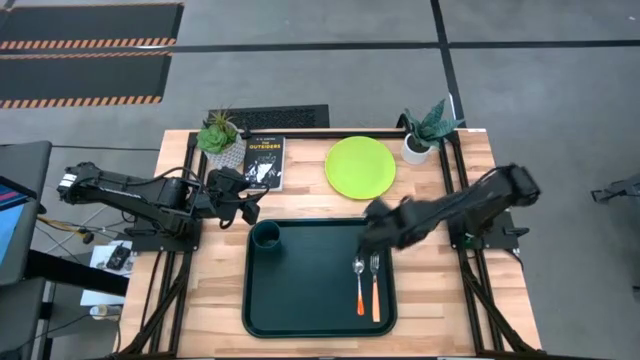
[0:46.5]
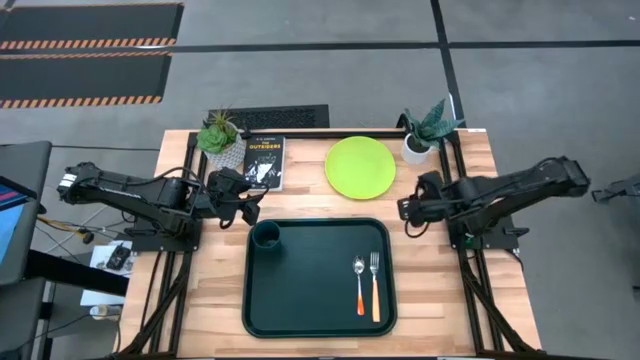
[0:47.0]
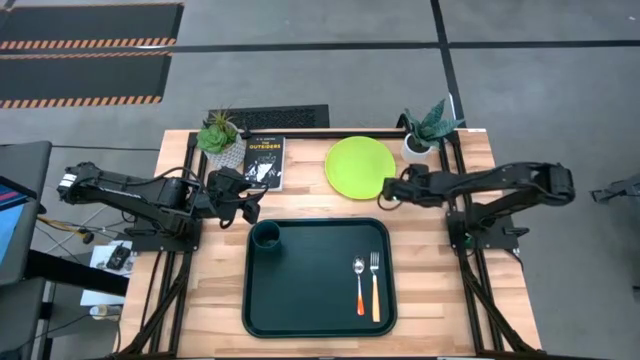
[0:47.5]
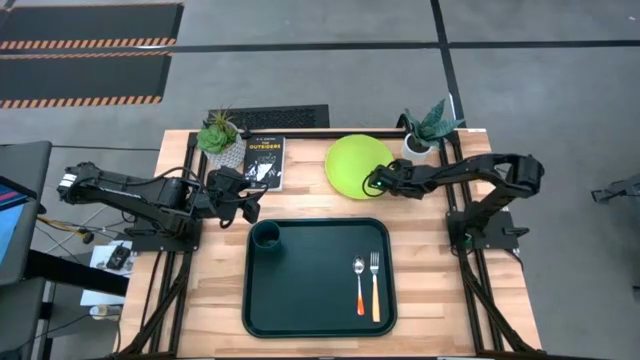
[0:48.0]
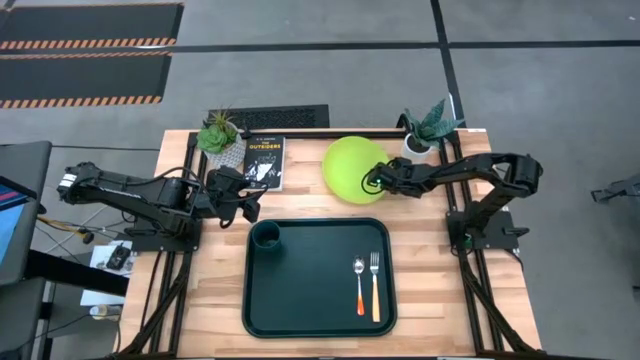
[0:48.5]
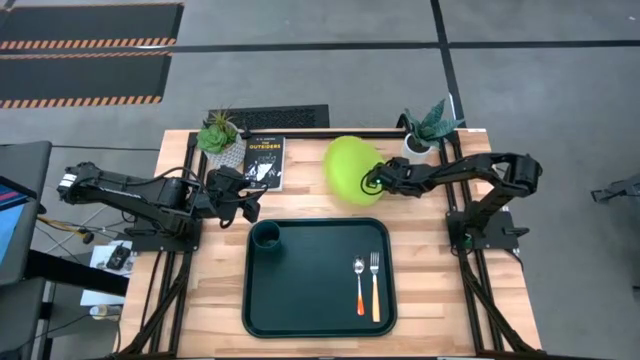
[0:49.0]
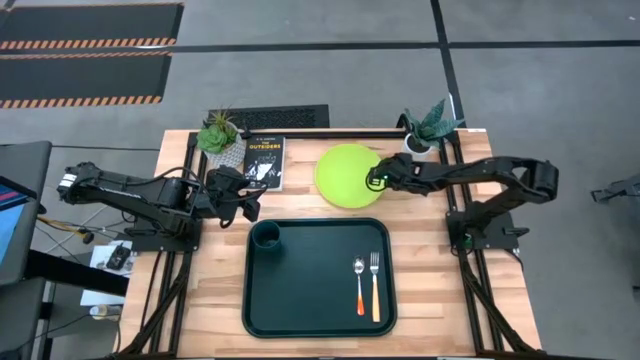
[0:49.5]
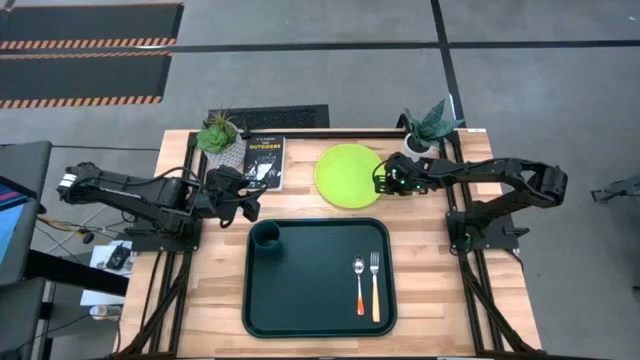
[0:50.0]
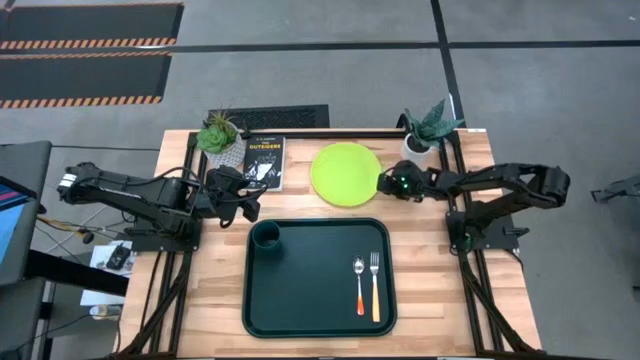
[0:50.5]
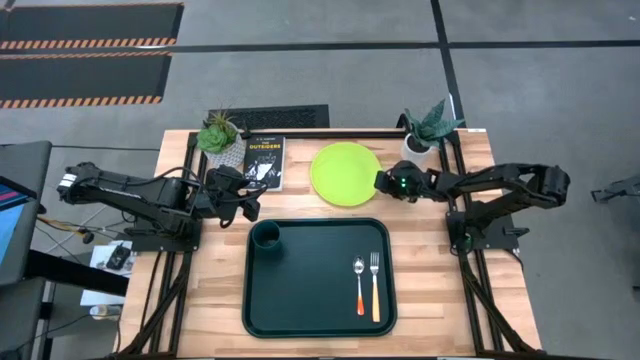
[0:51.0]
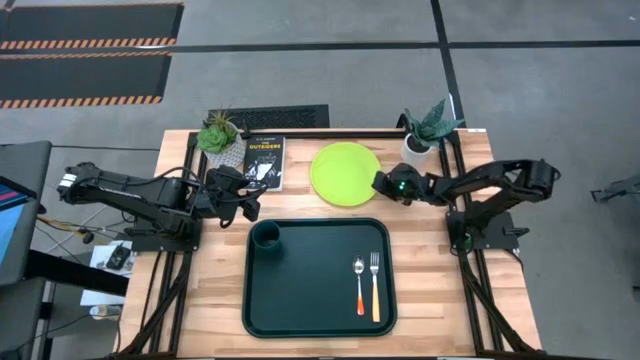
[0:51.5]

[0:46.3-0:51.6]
Task: Pick and place plate/cup/fork/spoon on tray
Put the yellow green plate onto the black tray

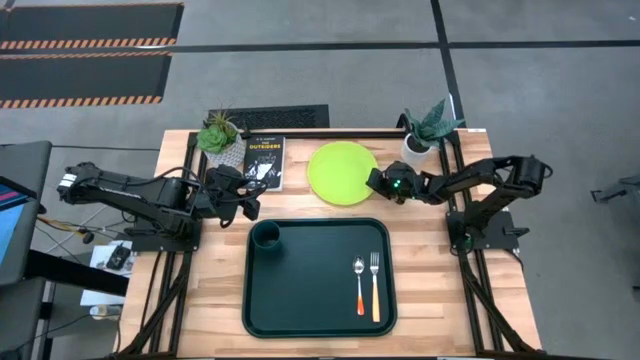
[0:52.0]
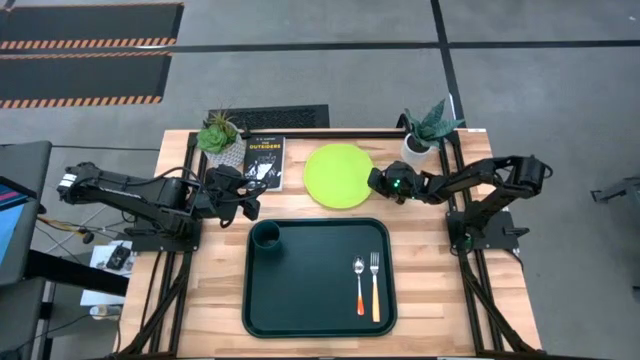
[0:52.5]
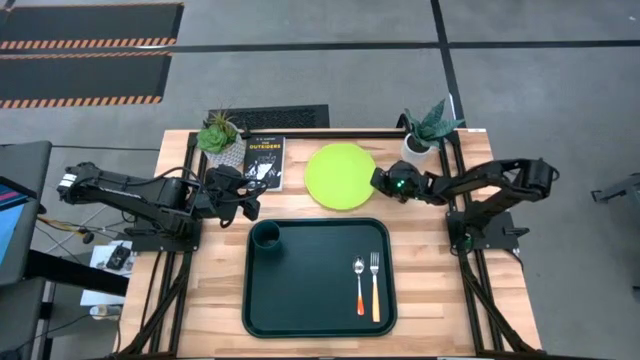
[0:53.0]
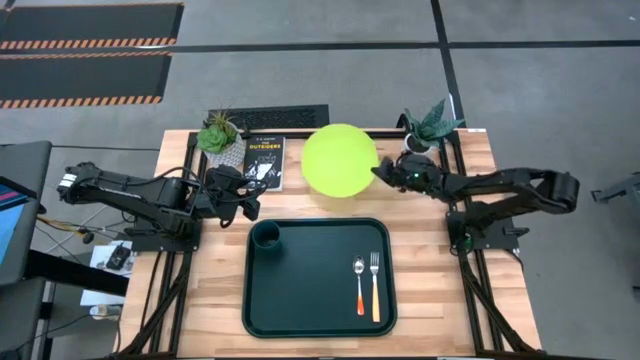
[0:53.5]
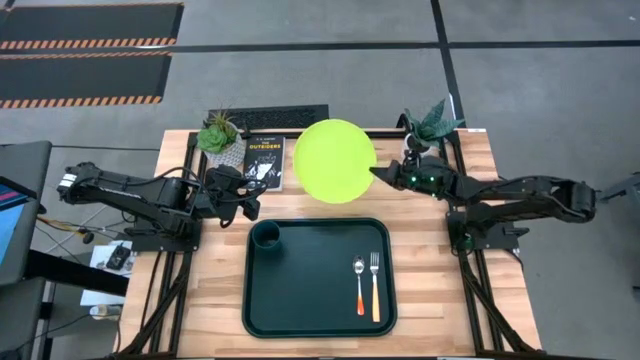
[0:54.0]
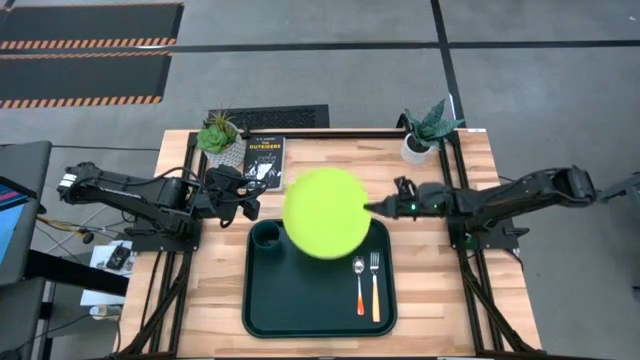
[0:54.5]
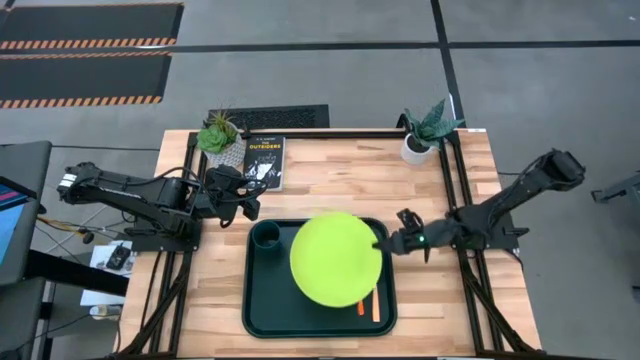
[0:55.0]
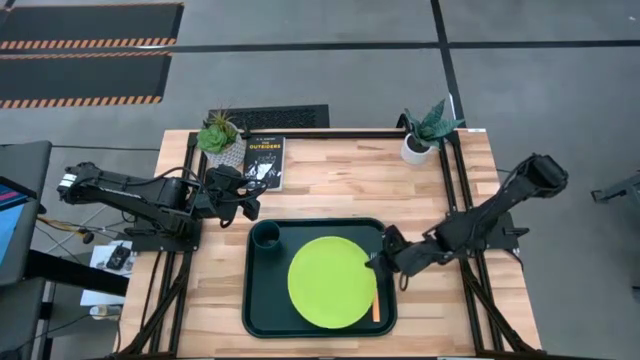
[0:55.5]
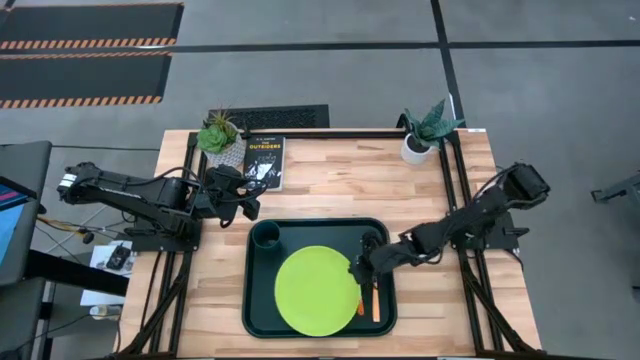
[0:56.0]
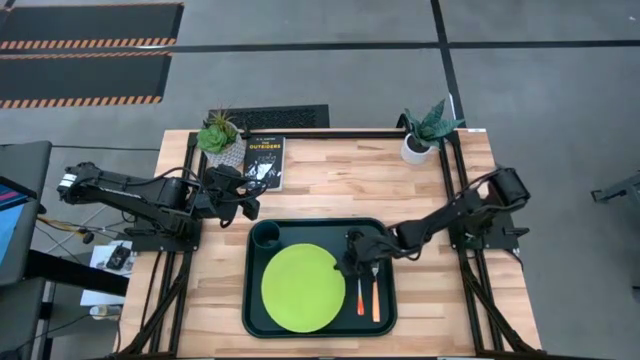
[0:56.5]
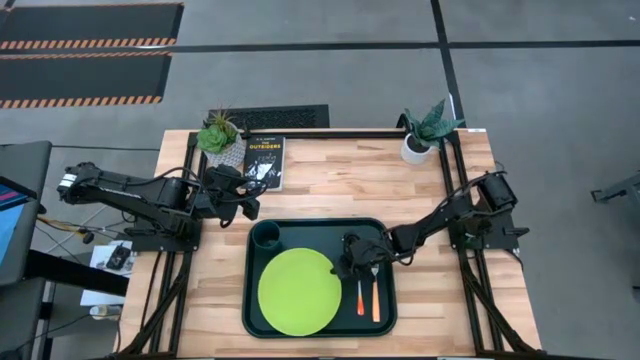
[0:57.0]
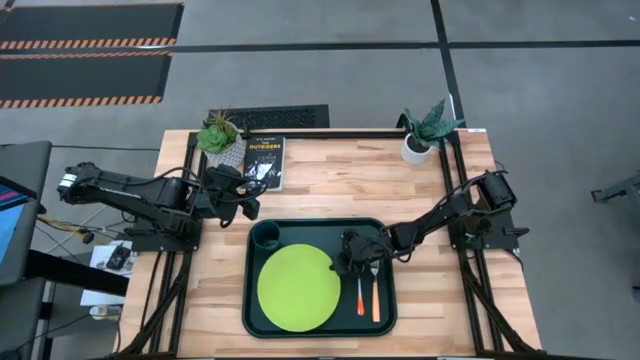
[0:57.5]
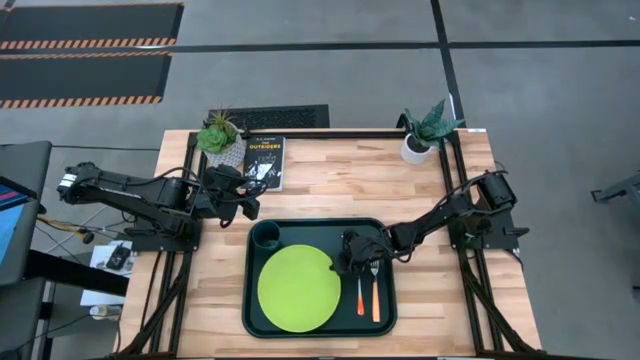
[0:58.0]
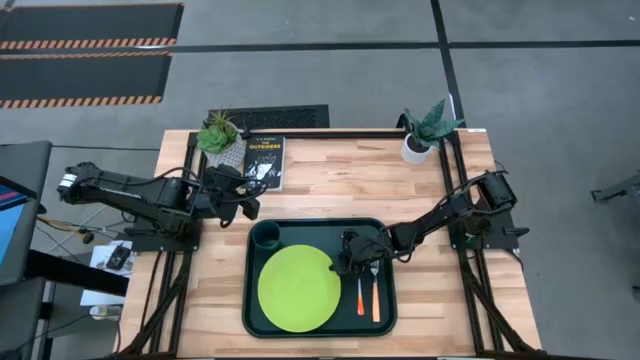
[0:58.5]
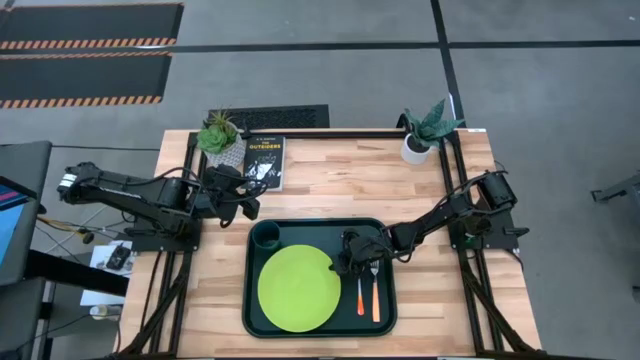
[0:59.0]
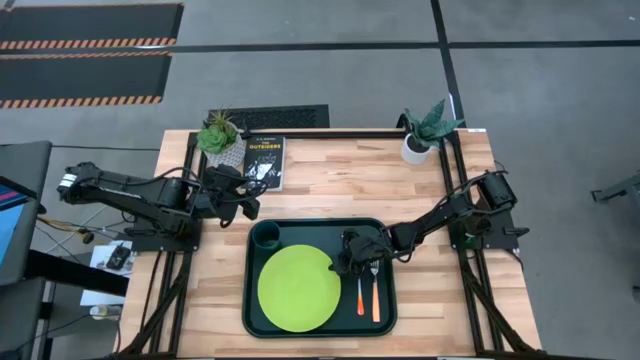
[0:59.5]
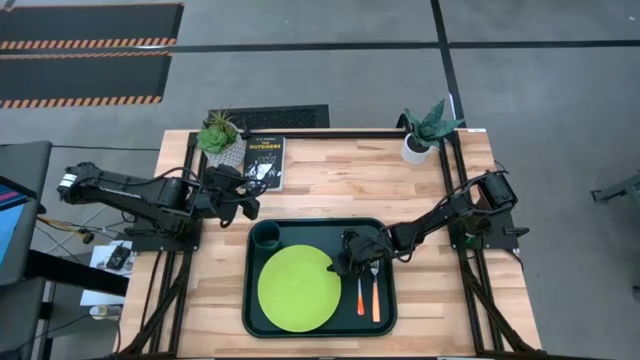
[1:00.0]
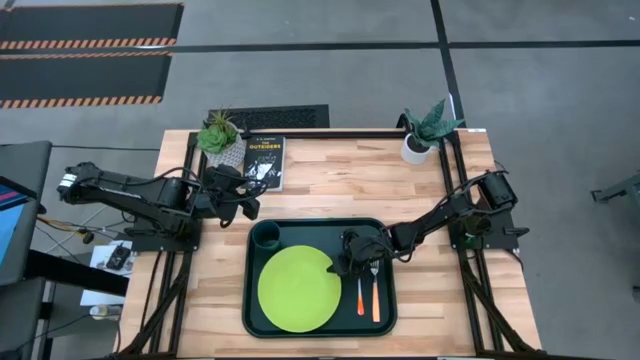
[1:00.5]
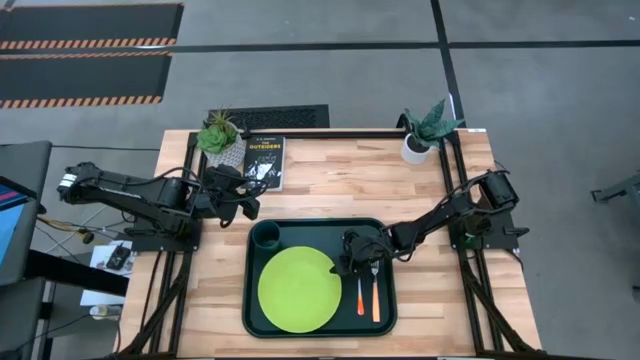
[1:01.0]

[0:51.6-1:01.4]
Put the yellow green plate onto the black tray

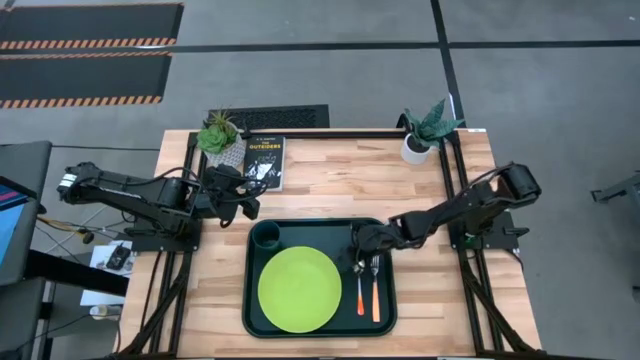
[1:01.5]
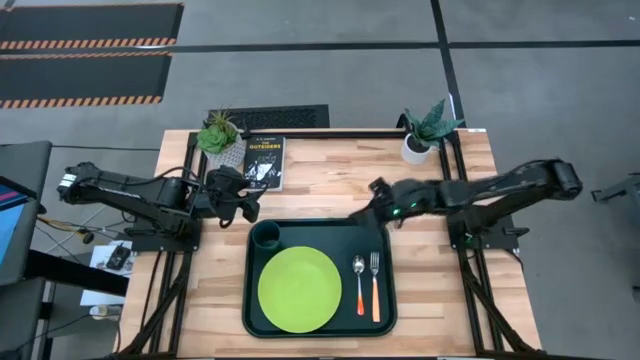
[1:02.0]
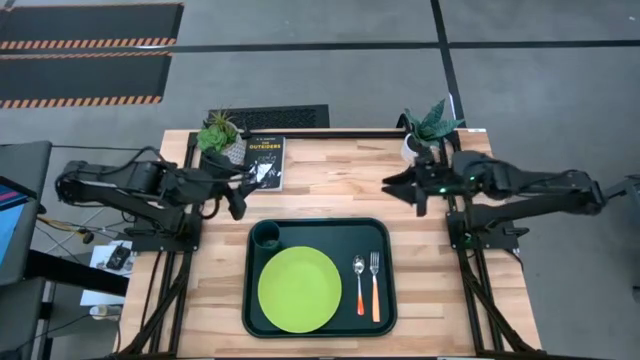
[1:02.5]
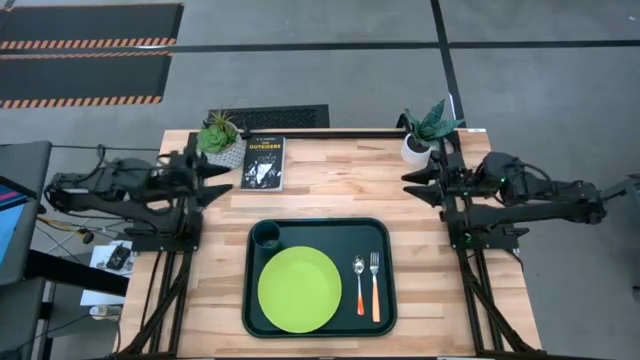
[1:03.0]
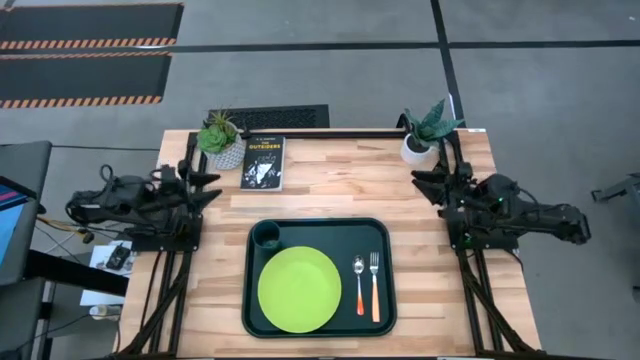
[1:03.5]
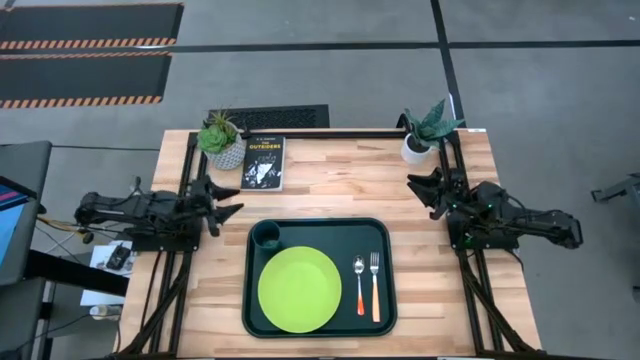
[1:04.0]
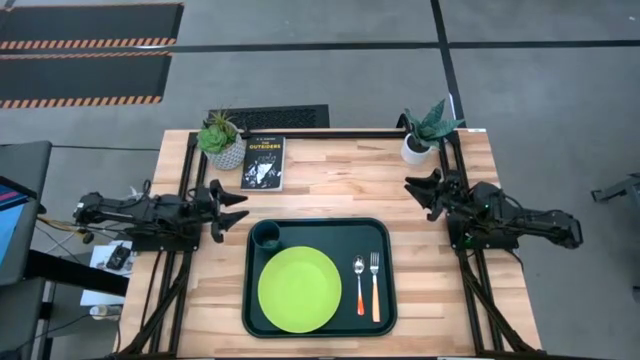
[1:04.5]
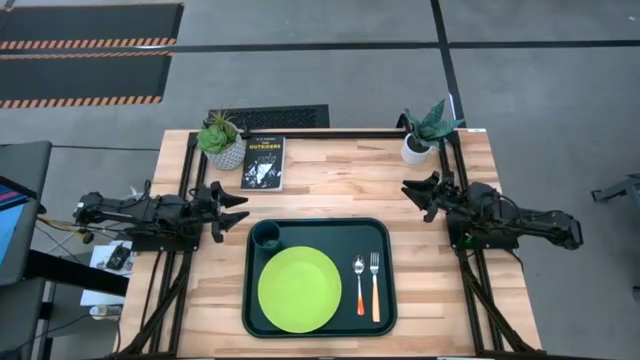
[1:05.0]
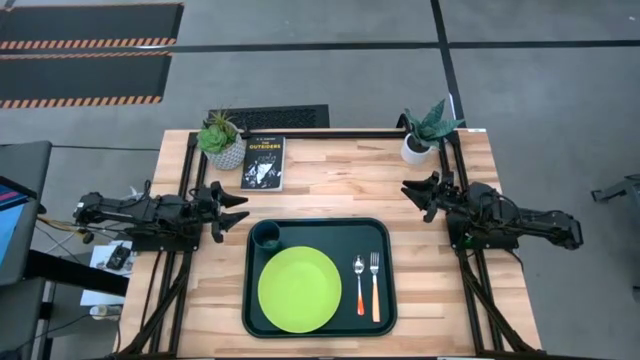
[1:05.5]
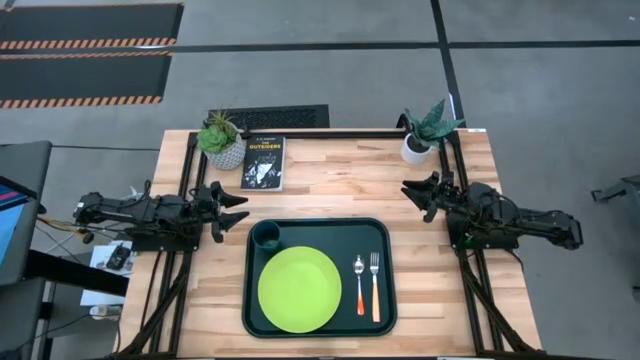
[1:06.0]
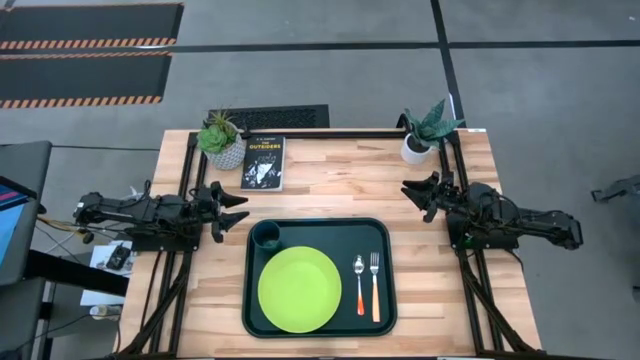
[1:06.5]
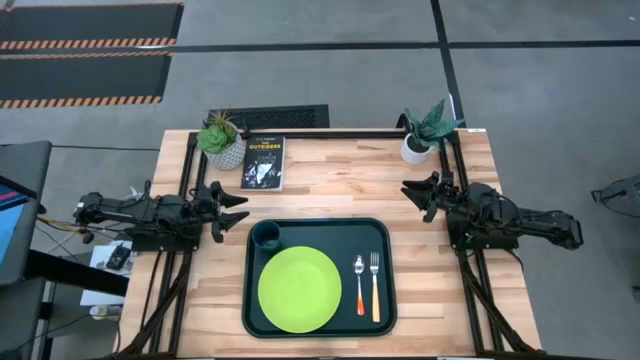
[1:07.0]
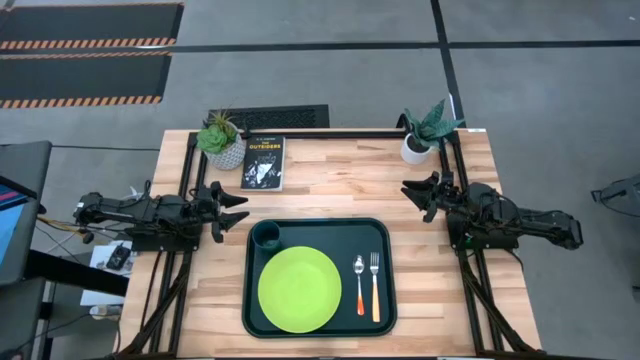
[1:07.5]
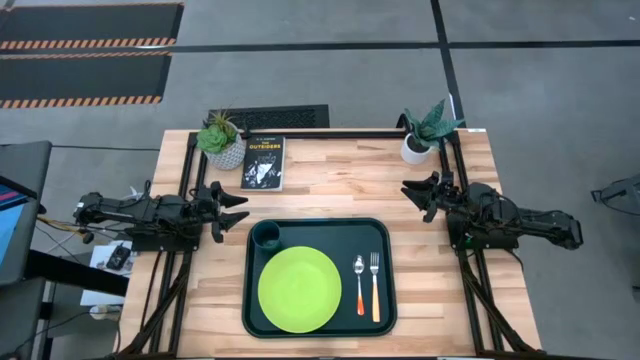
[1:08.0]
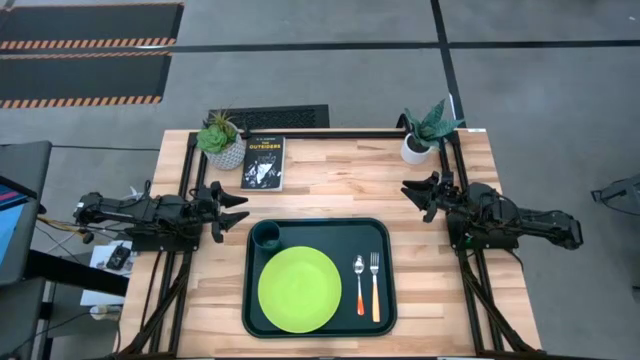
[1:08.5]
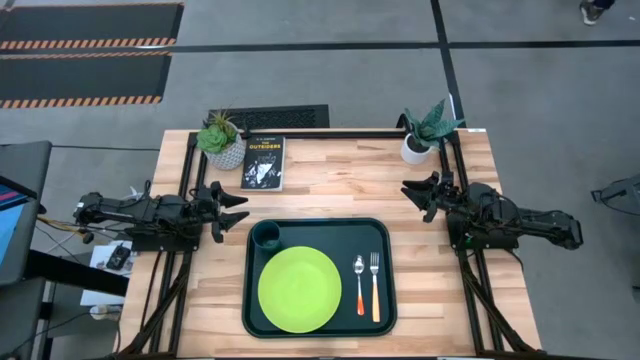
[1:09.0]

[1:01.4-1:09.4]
Return to Home Position
